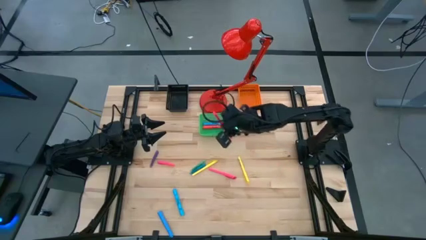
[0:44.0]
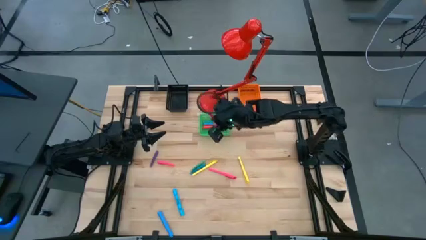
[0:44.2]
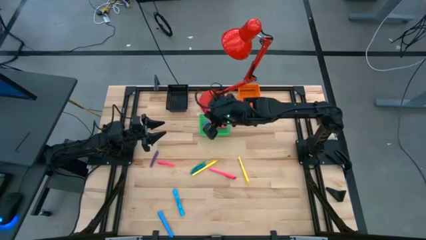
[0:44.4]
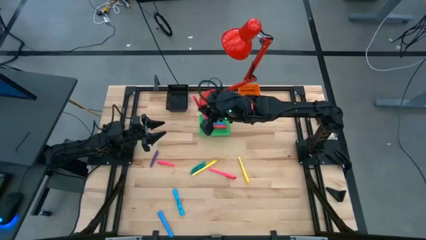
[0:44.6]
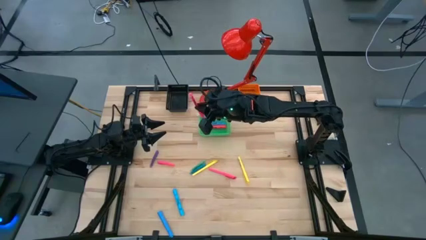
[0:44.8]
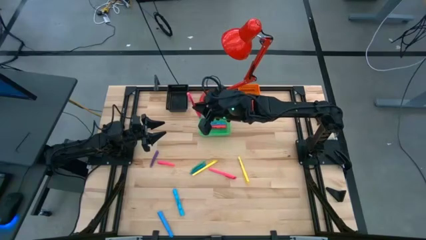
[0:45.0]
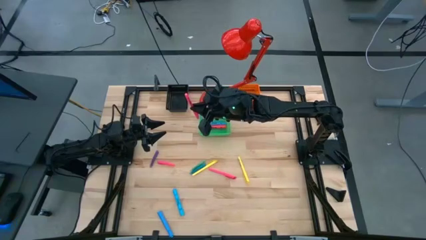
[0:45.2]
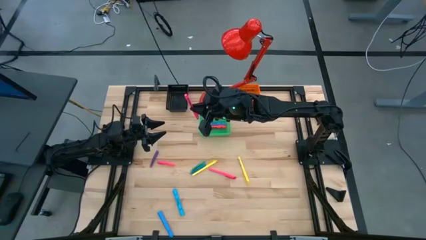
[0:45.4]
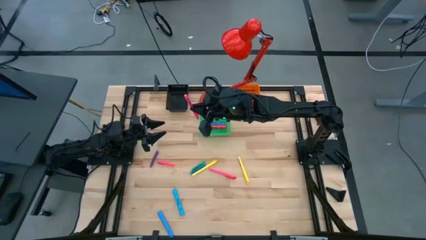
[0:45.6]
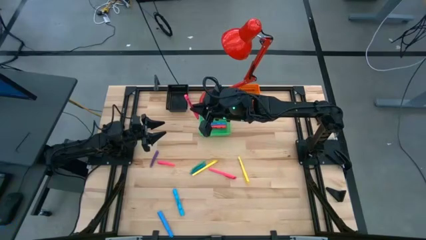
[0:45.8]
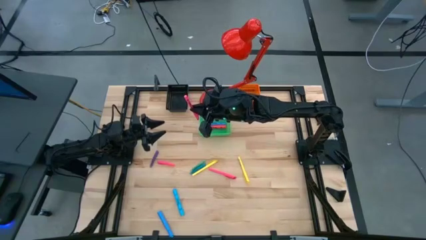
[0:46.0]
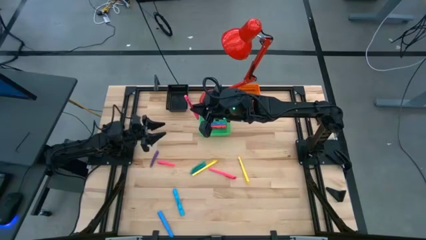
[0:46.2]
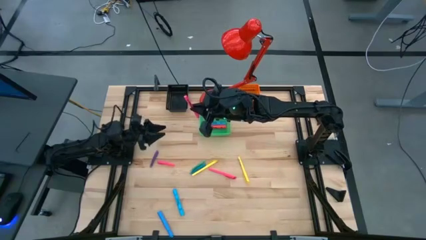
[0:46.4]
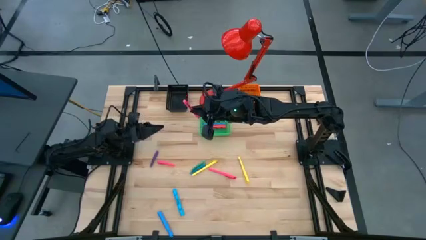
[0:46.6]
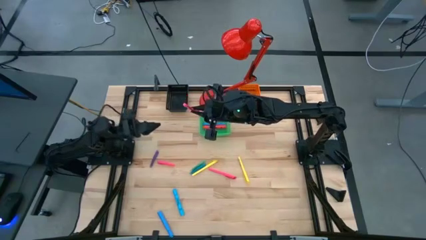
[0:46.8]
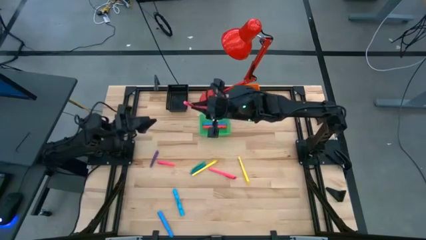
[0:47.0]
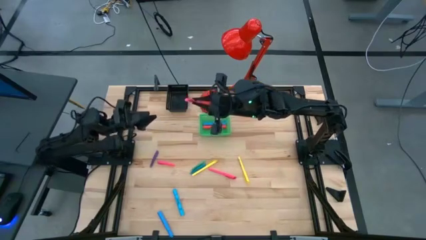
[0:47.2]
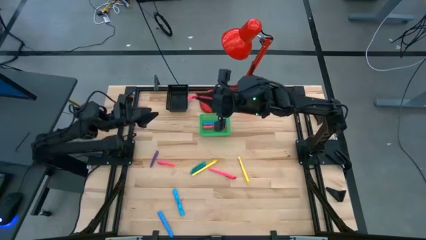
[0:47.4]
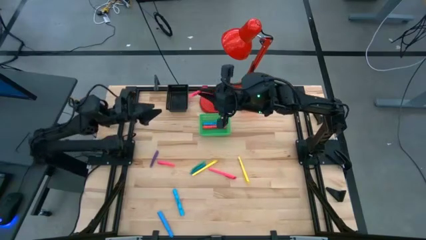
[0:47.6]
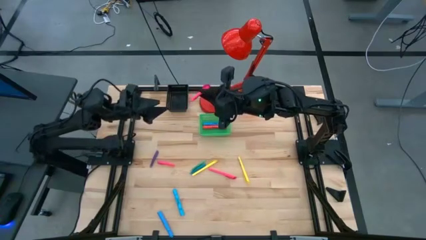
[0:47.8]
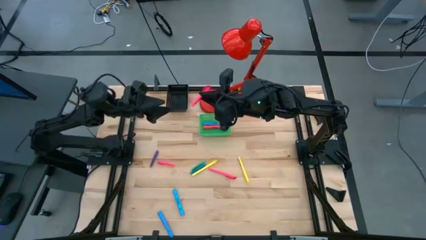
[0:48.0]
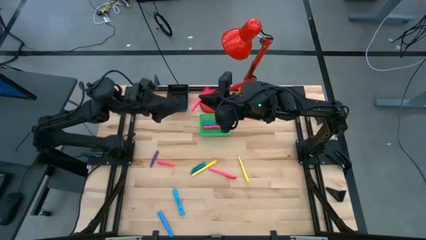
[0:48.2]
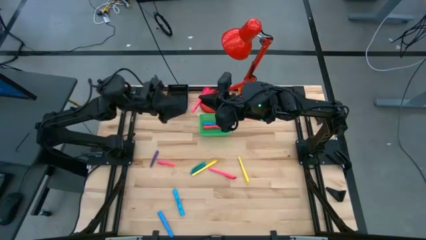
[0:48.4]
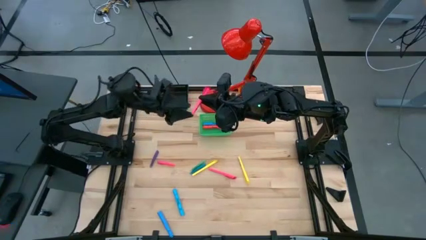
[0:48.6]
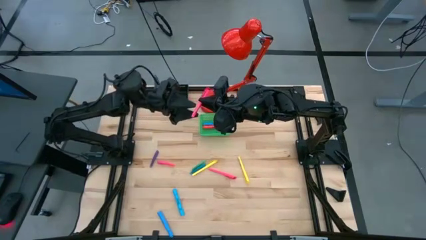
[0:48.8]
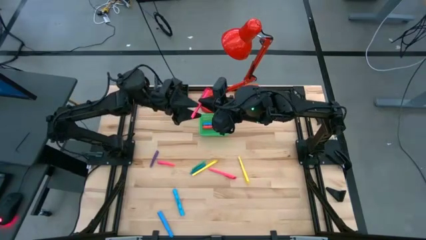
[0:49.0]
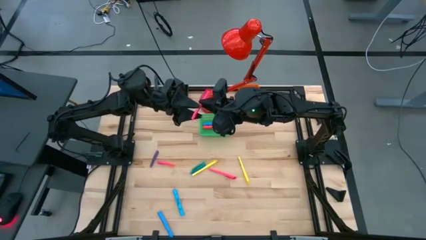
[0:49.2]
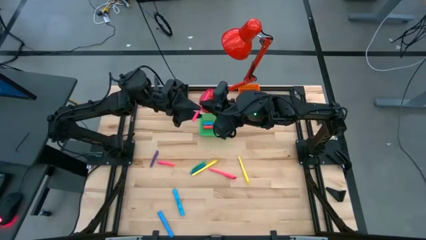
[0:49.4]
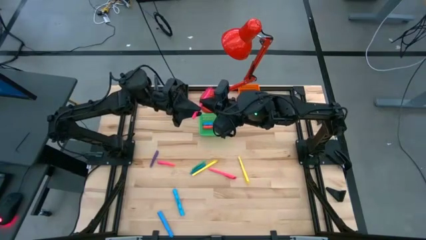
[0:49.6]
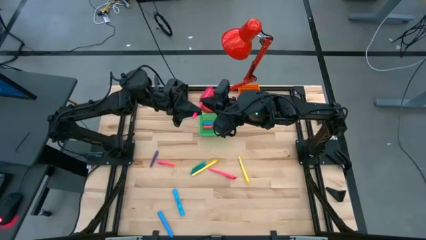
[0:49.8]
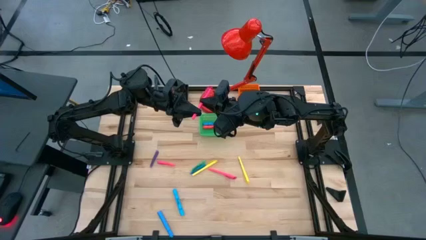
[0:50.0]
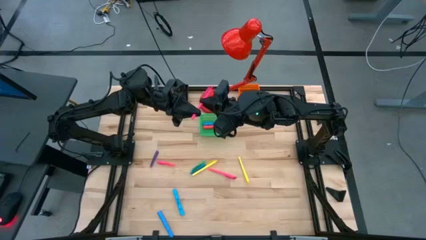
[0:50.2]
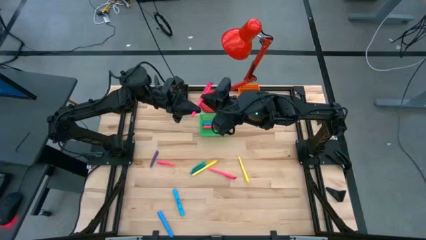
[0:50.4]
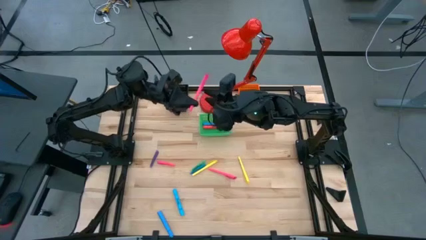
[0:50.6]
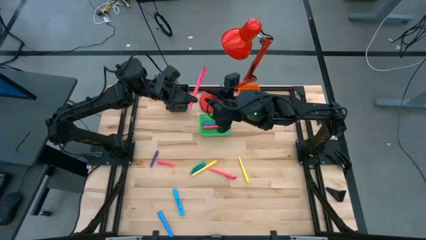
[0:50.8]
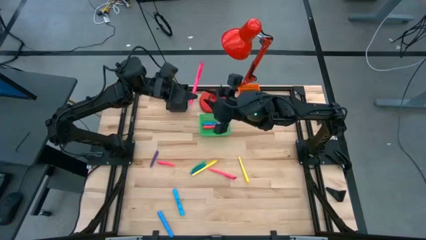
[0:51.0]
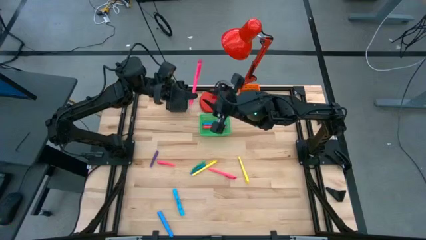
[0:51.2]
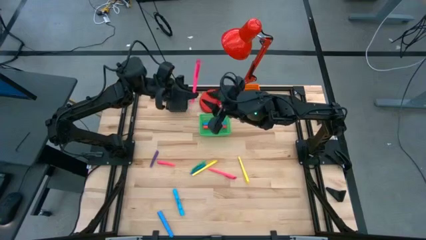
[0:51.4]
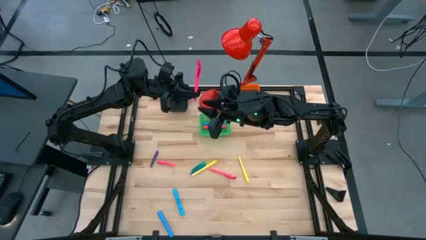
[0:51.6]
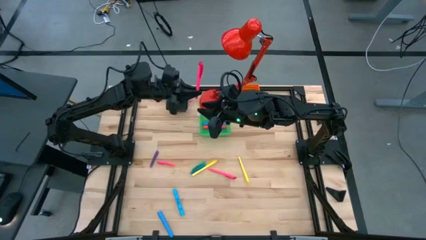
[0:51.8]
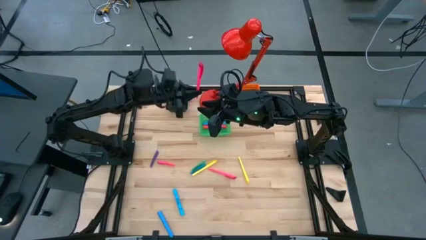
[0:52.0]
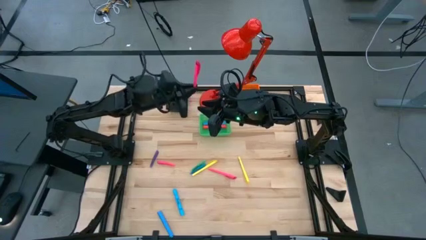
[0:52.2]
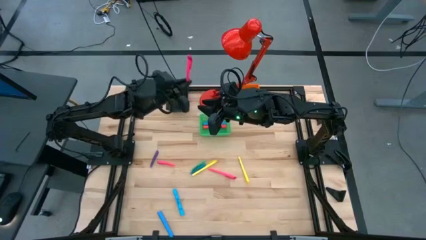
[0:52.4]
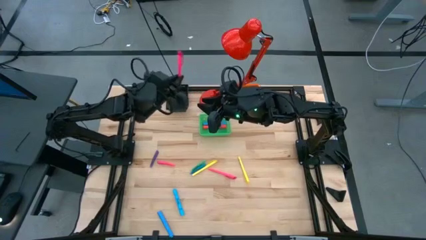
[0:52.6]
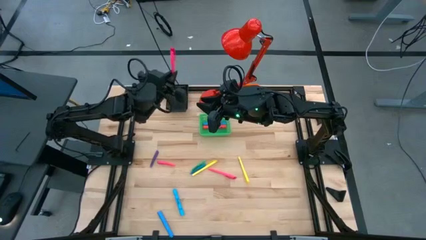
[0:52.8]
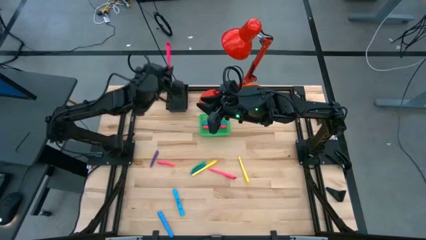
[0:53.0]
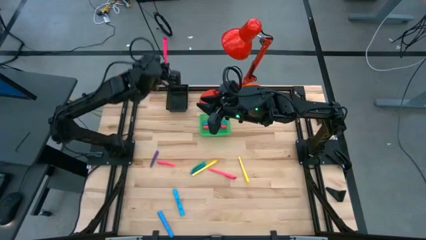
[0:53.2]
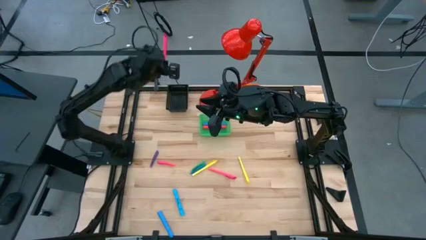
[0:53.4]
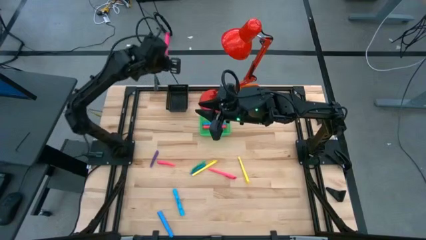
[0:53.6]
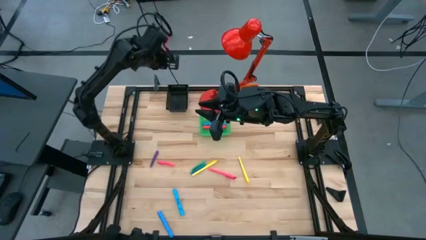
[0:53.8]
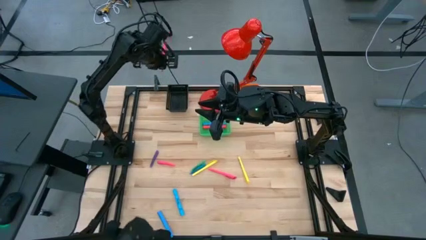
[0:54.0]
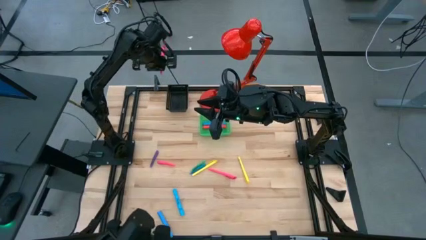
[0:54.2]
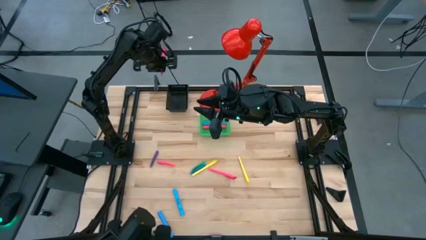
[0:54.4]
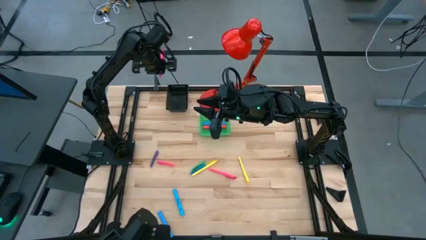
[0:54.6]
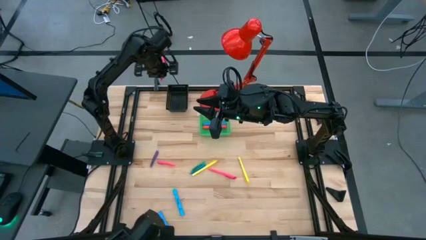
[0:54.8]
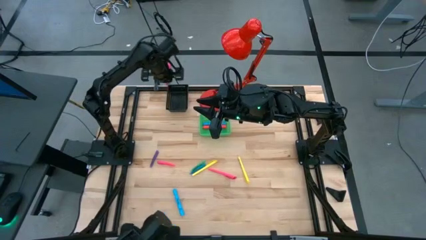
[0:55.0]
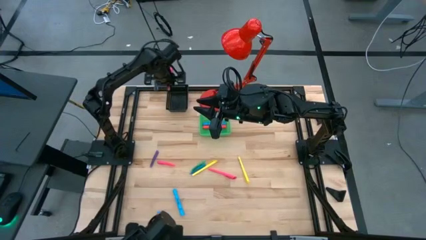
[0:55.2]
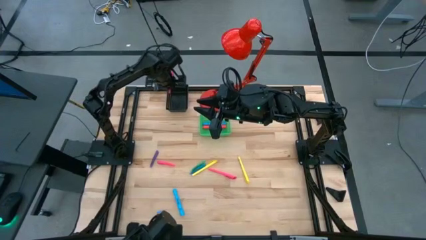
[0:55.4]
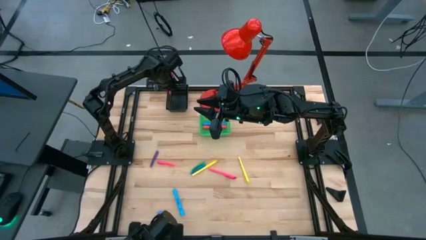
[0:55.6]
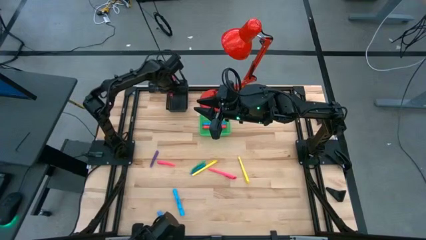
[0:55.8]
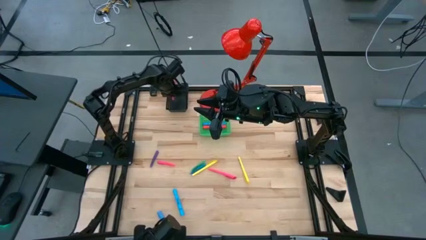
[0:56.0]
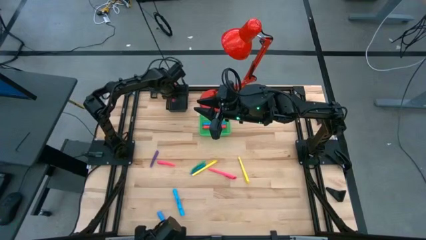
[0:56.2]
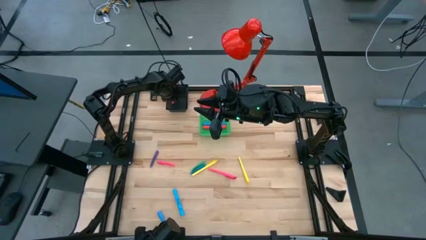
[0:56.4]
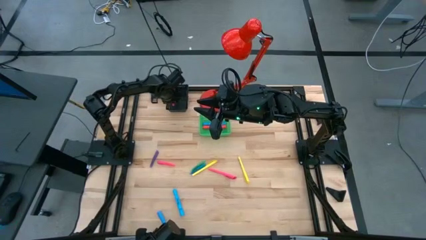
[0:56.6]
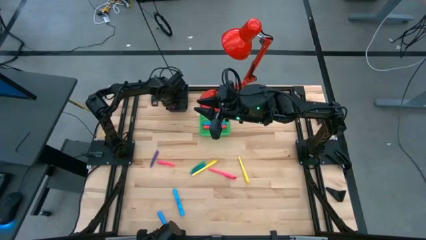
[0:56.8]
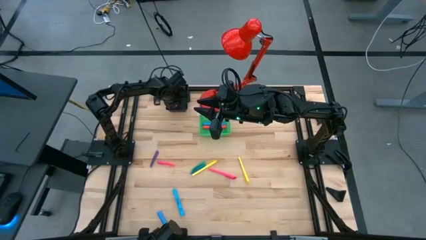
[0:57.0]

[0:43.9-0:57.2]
Task: Pick & Place Markers
Put the pink pen into the black basket
